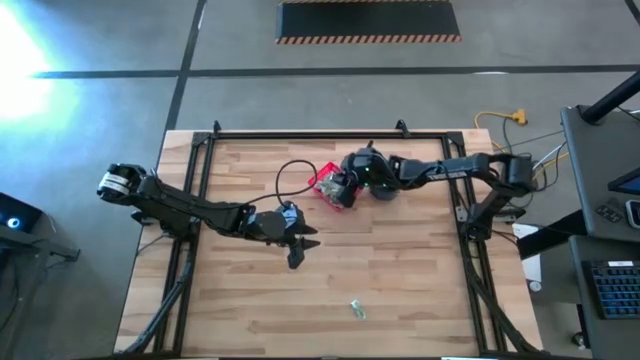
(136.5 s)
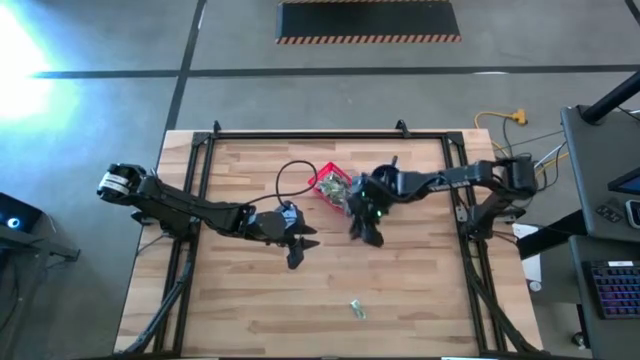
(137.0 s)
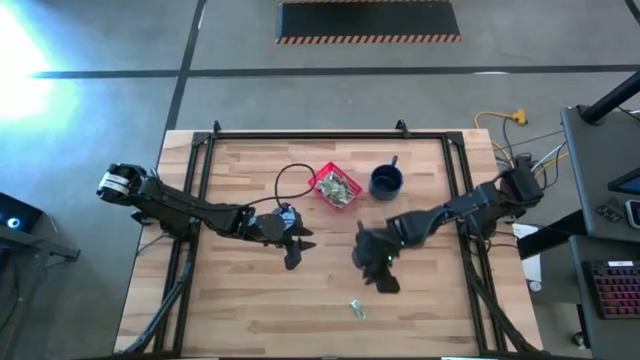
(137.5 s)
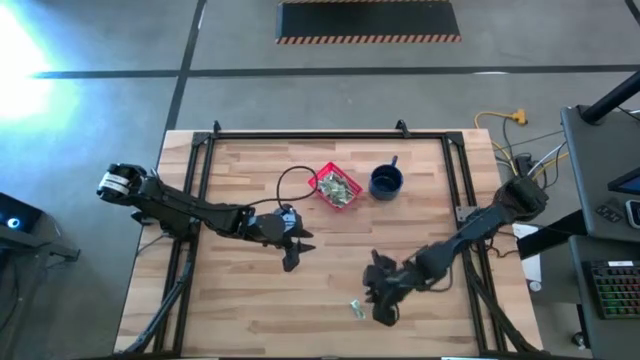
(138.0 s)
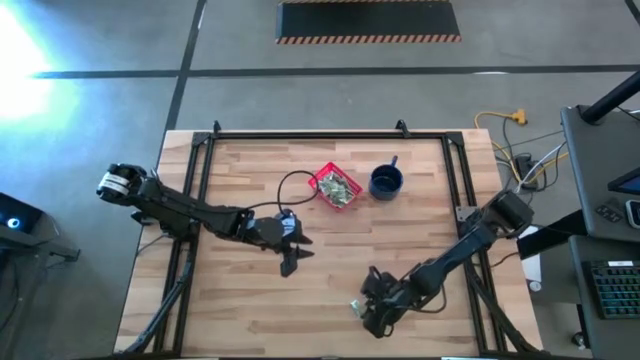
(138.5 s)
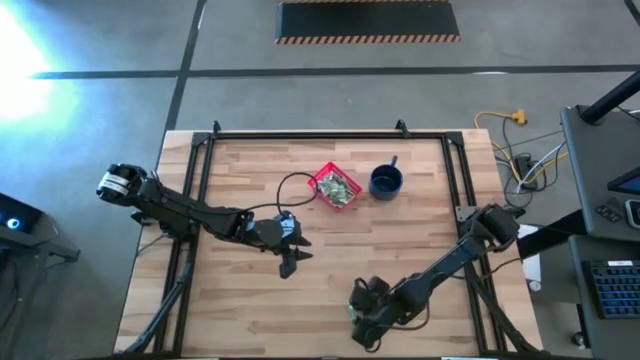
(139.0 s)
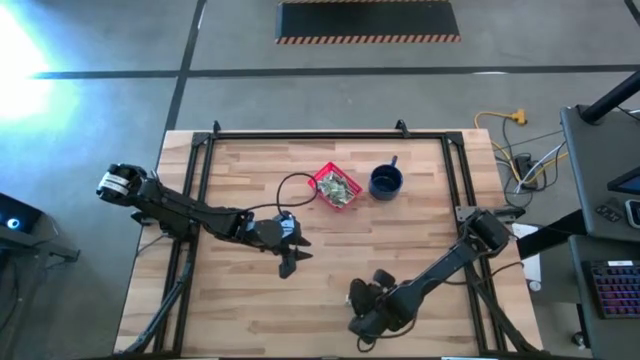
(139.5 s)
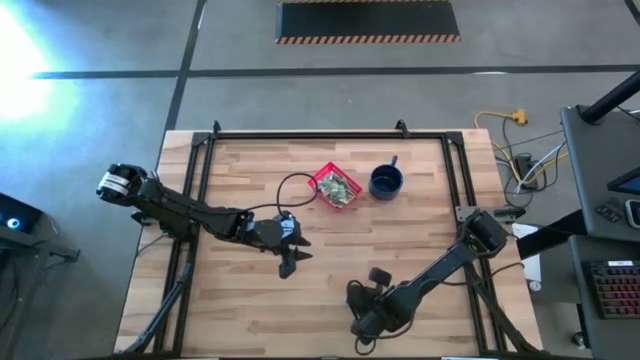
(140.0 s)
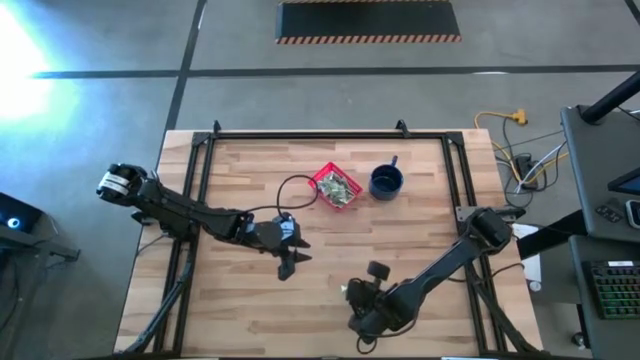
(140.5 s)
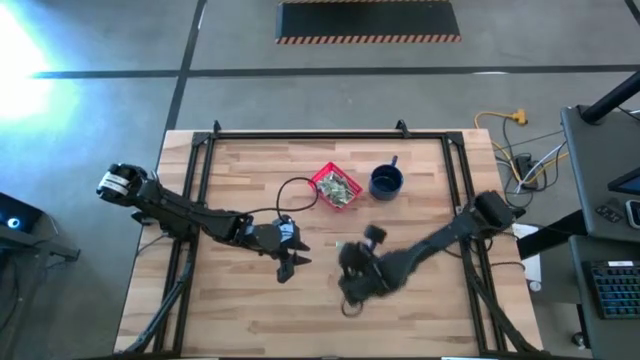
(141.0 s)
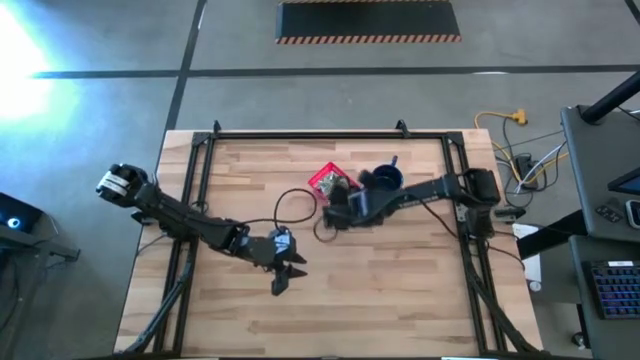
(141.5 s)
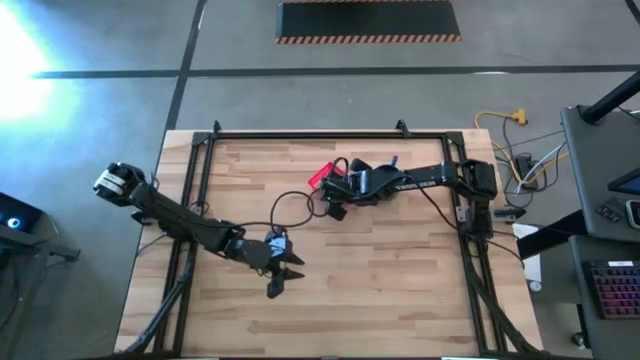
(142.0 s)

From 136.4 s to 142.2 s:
Task: Pick and place Stevia / Truvia into bins
Put the stevia packet into the red basket

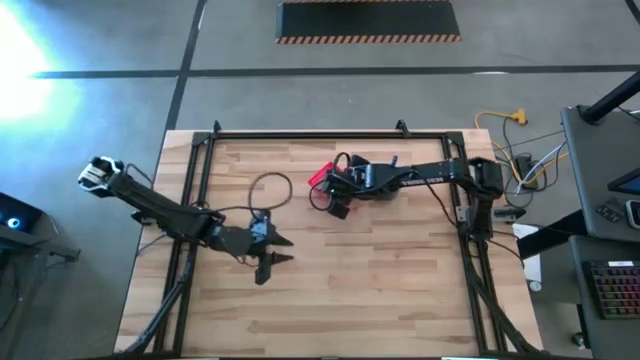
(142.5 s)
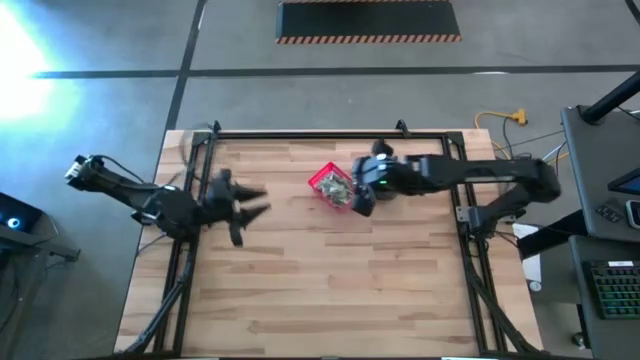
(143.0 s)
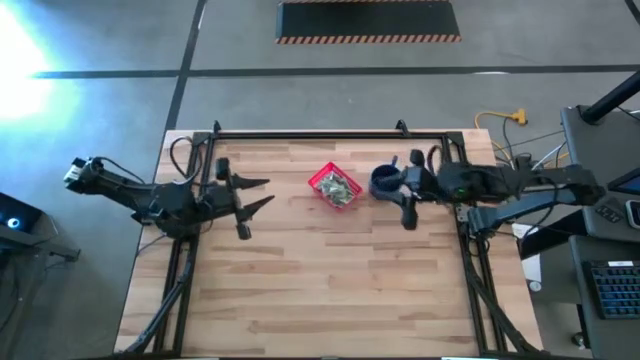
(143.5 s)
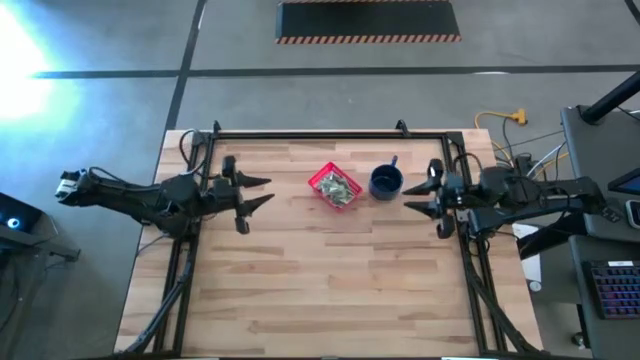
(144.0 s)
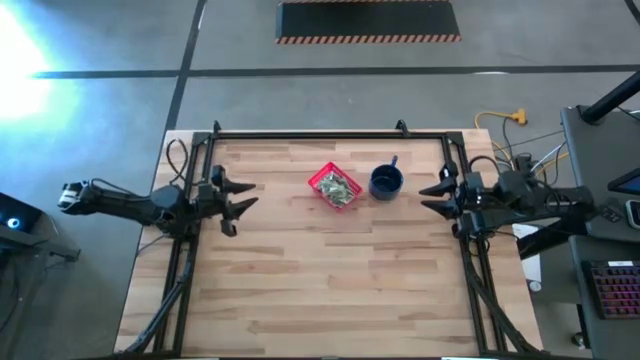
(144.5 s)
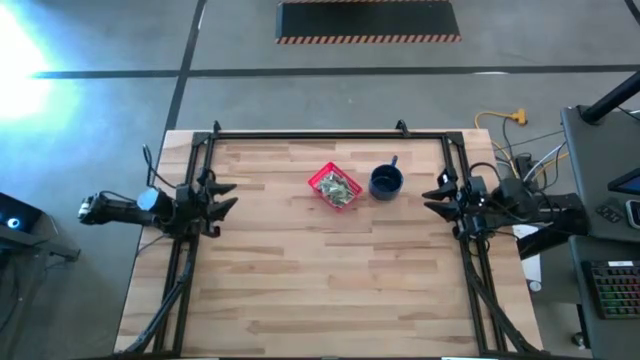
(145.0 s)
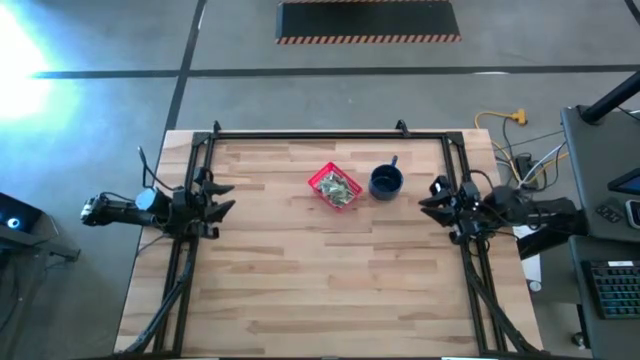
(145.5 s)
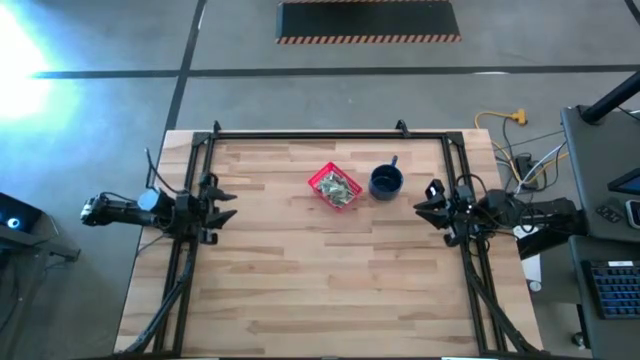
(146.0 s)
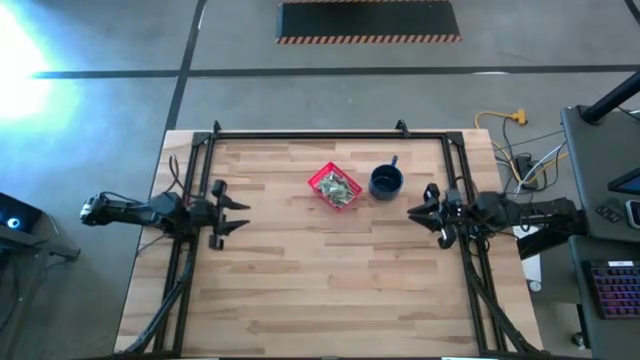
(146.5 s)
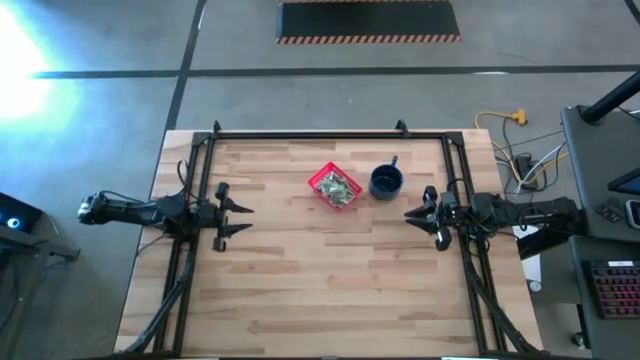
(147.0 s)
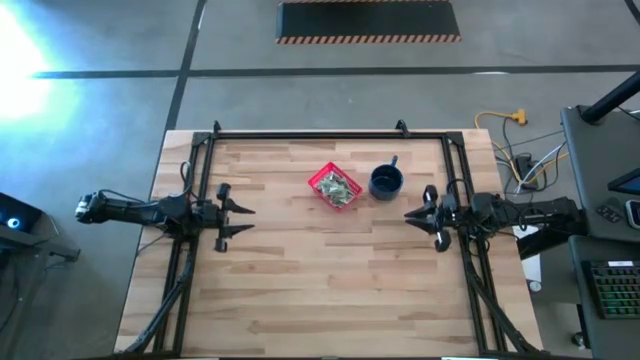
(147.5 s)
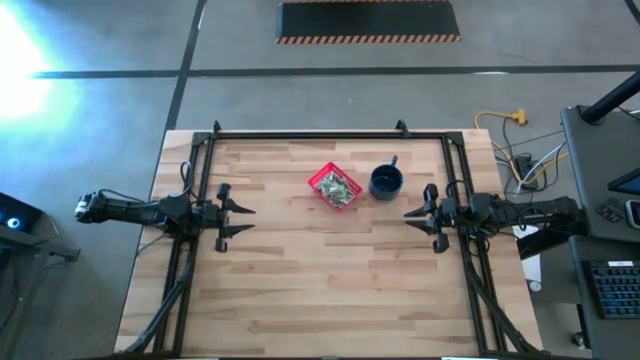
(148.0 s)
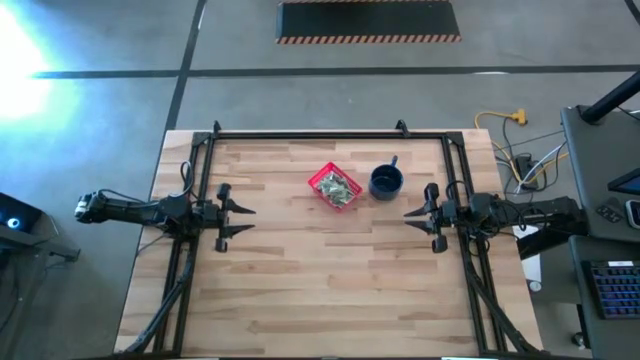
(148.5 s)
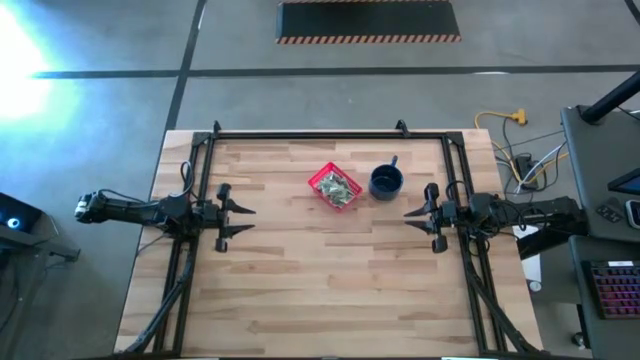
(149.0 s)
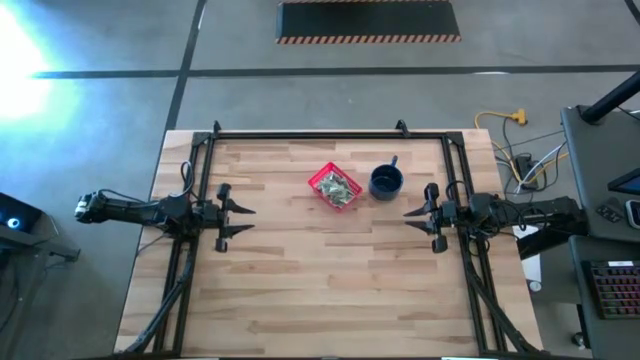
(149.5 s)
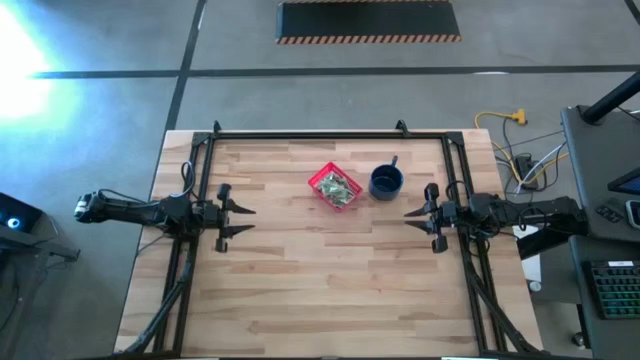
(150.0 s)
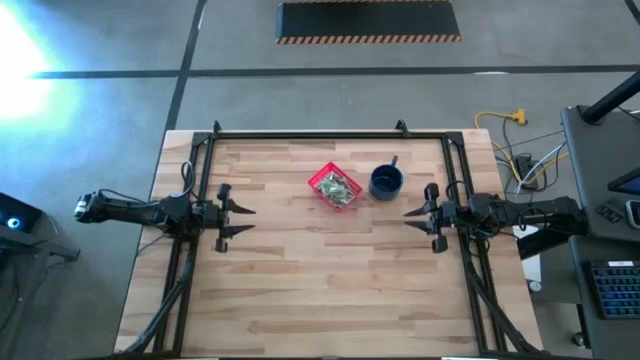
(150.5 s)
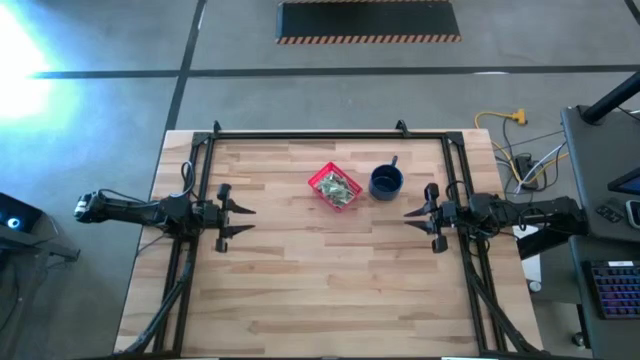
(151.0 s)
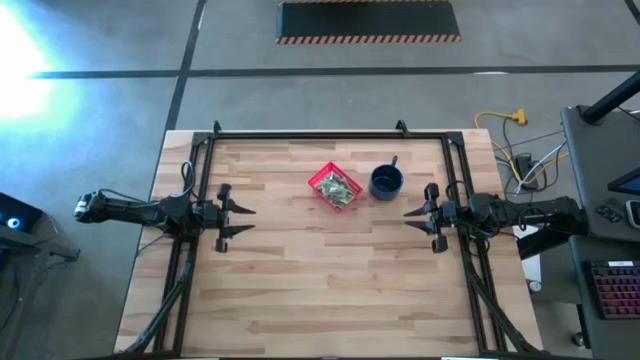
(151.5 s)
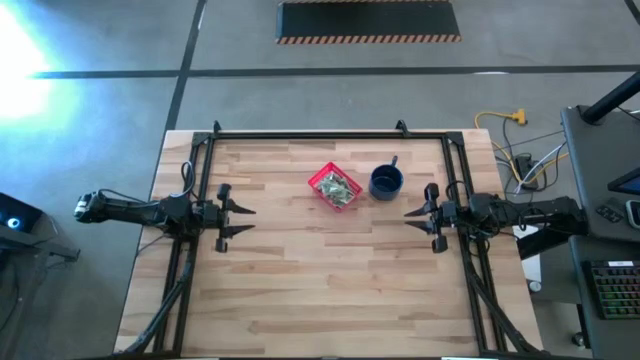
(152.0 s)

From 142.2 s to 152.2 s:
Return to Home Position

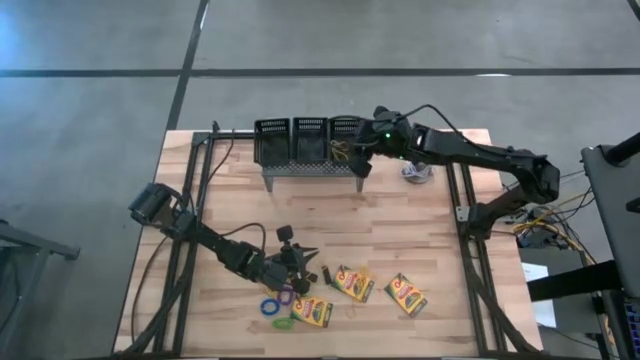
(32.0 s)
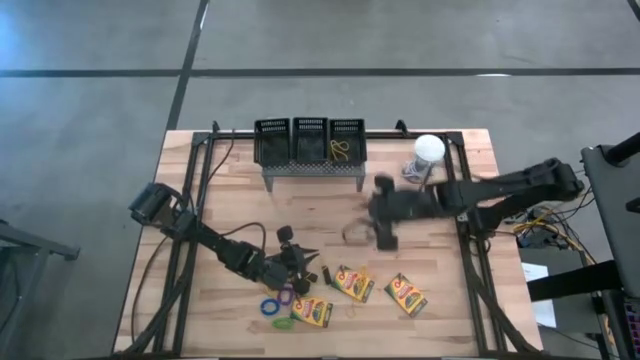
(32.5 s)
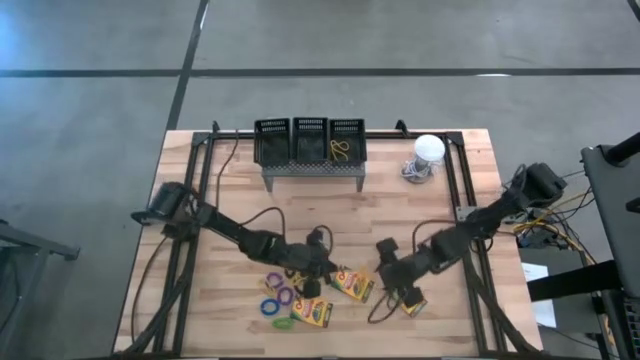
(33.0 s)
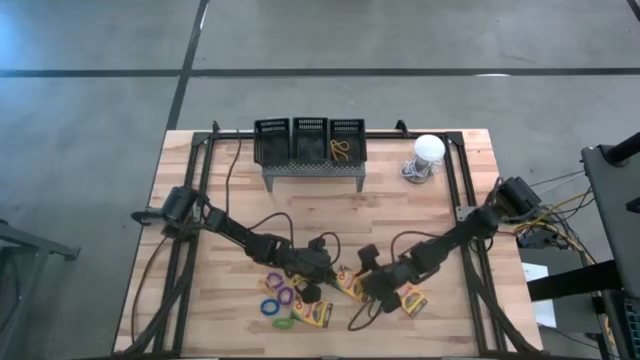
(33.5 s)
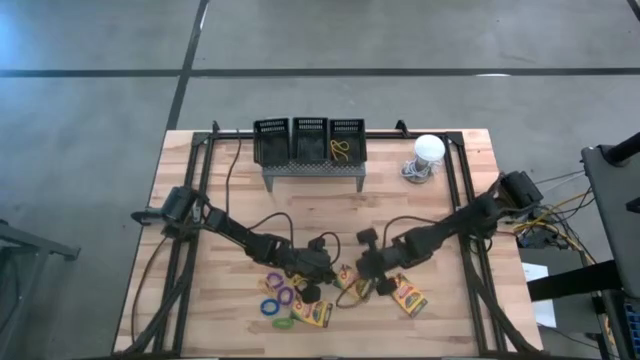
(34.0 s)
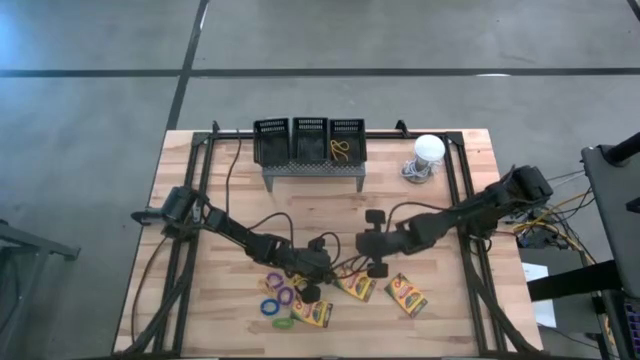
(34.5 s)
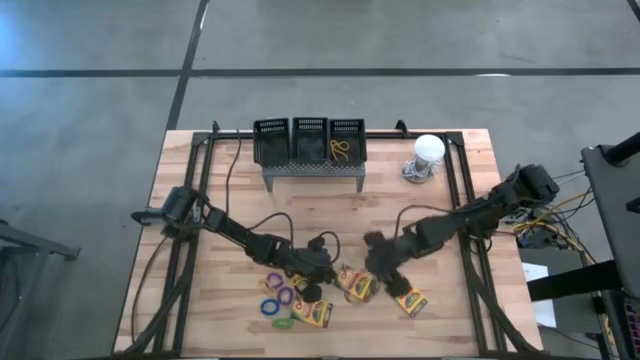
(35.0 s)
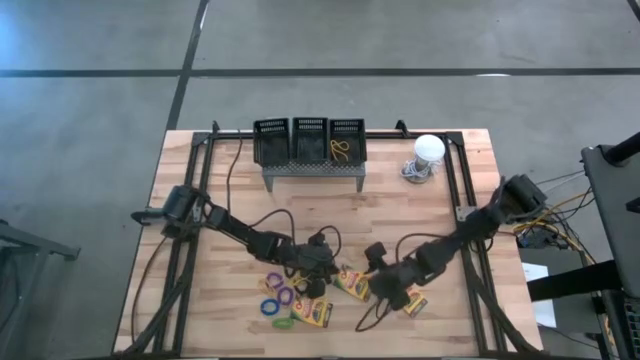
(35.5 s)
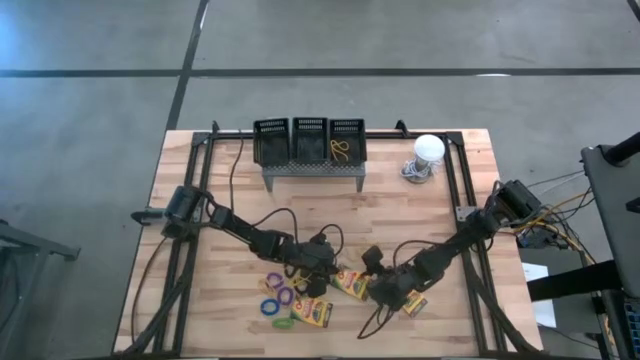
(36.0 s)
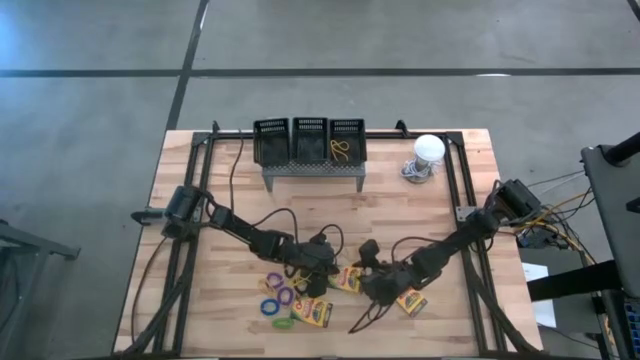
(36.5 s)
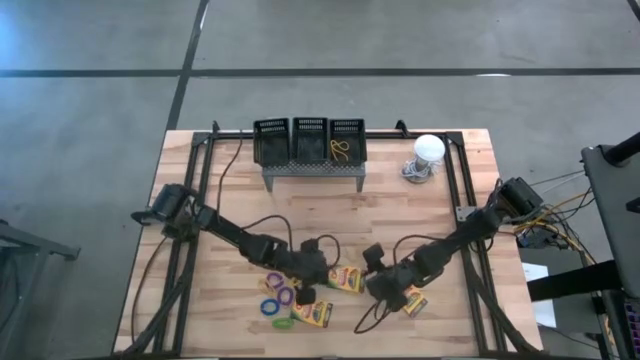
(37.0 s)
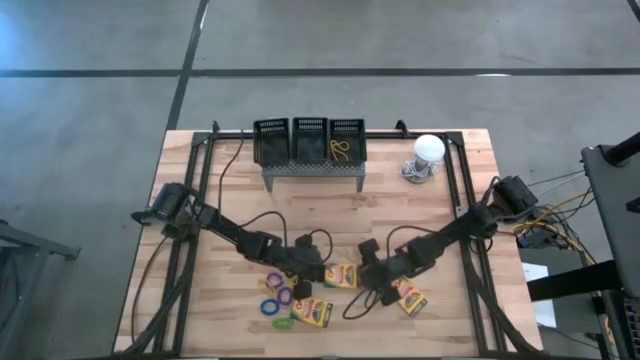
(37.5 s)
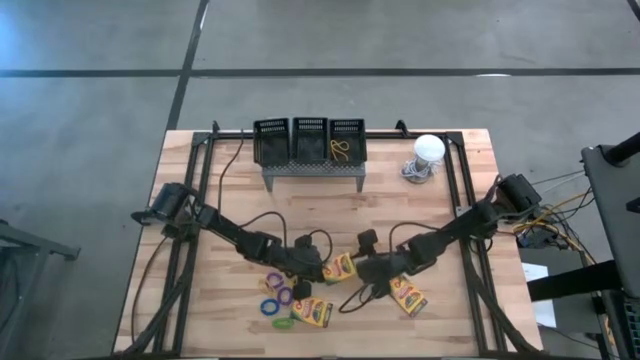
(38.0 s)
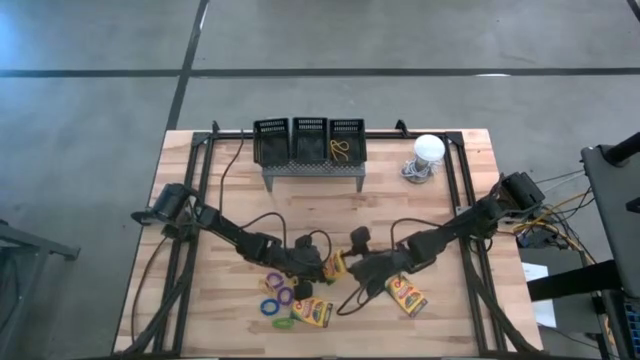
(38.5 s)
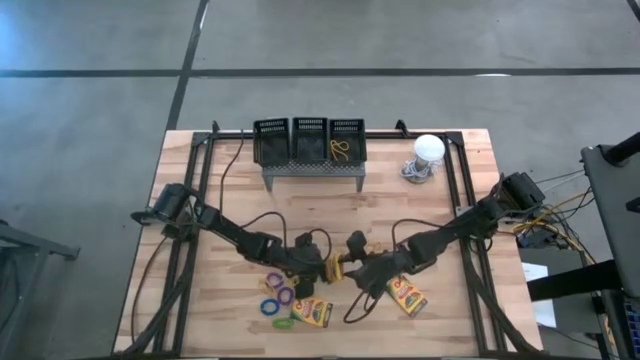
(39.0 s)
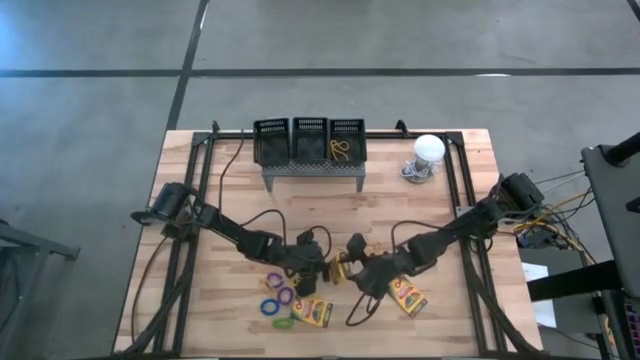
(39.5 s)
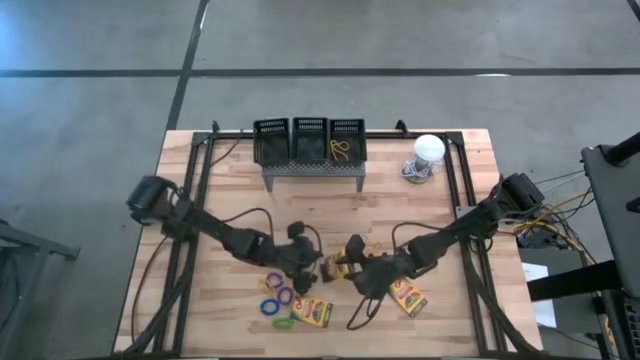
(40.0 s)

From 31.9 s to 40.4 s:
Task: Pick & Place Office Desk Supplies
Put the crayon box into the middle black basket on the shelf
